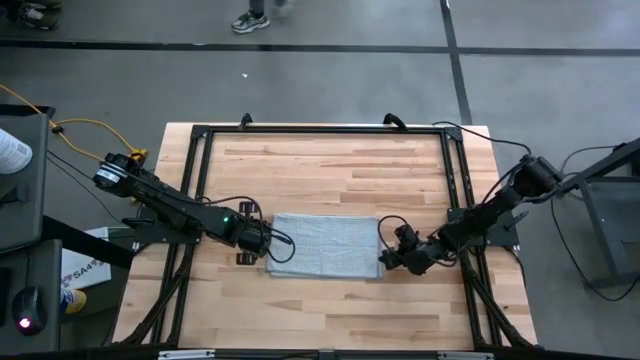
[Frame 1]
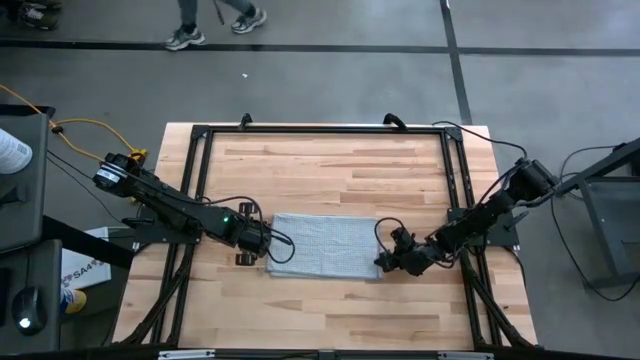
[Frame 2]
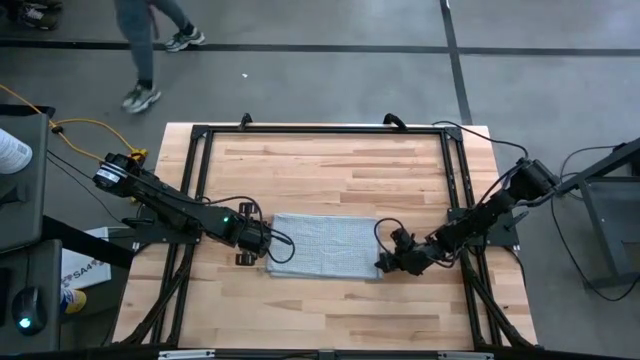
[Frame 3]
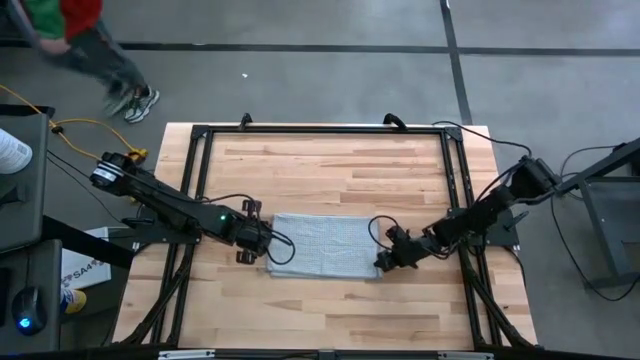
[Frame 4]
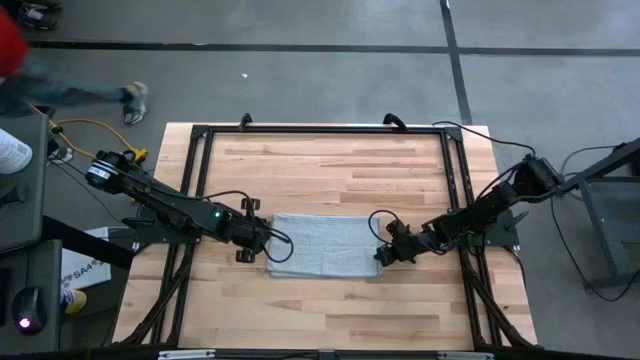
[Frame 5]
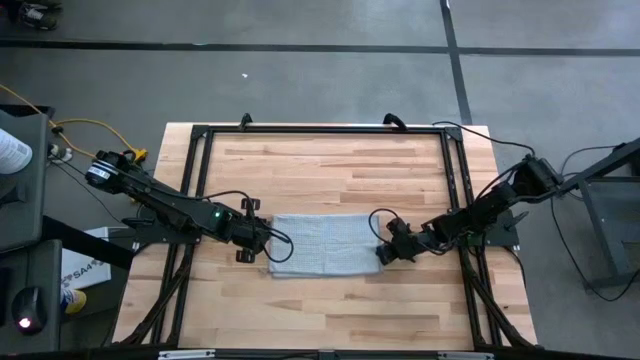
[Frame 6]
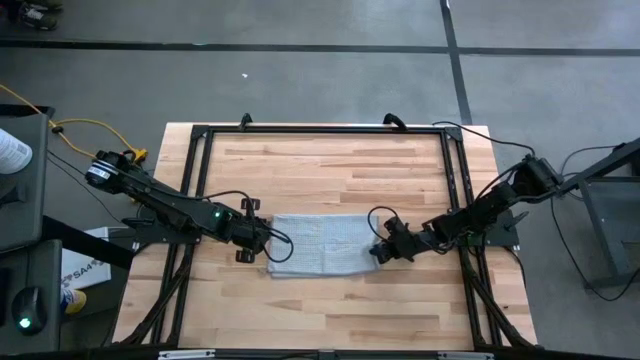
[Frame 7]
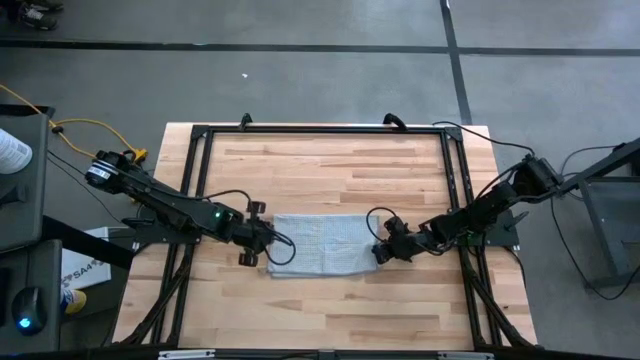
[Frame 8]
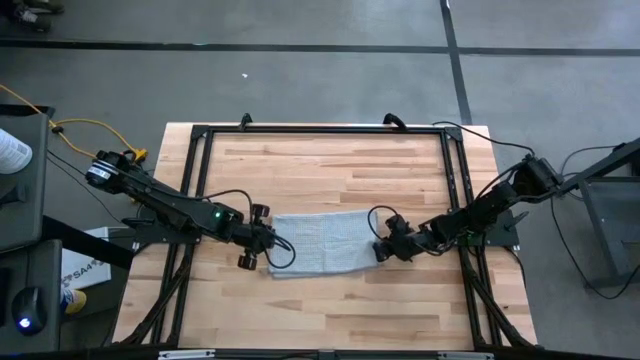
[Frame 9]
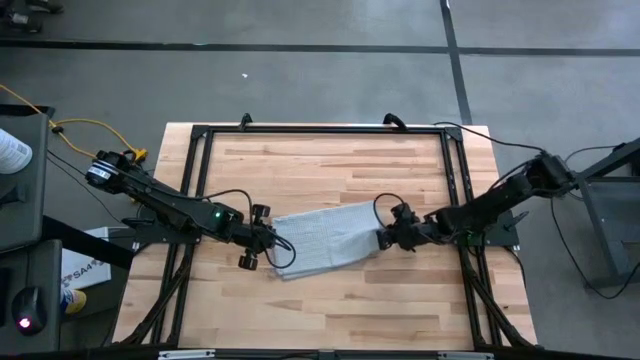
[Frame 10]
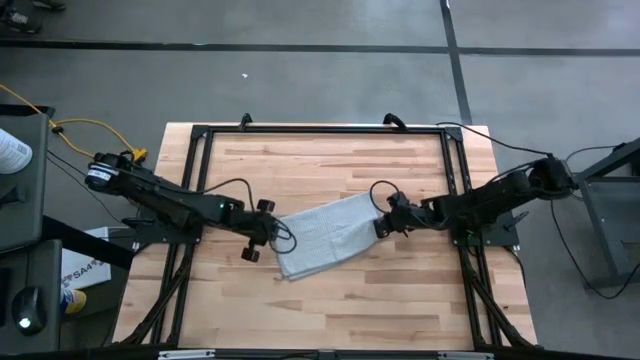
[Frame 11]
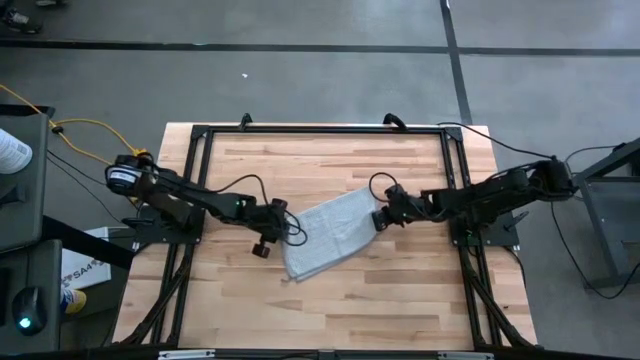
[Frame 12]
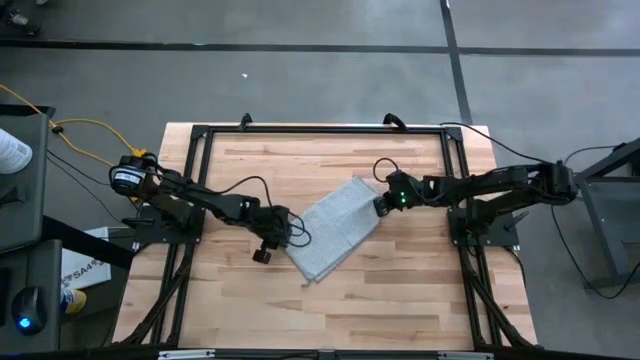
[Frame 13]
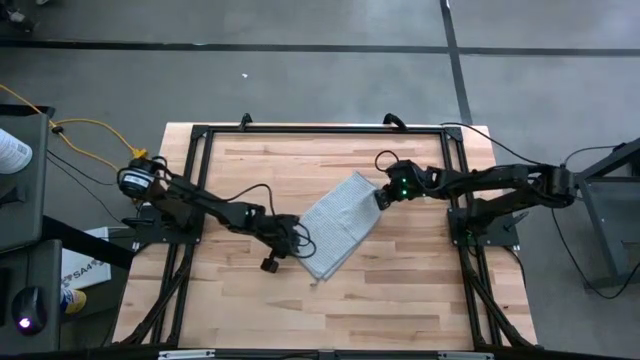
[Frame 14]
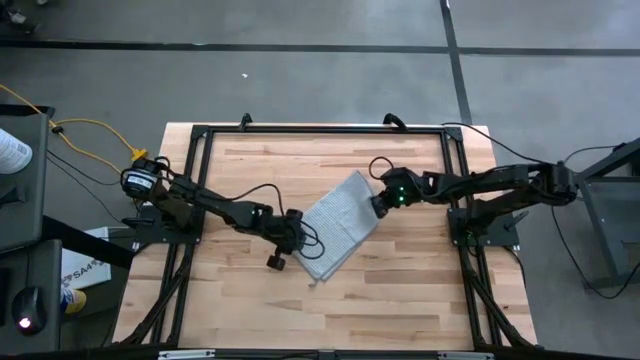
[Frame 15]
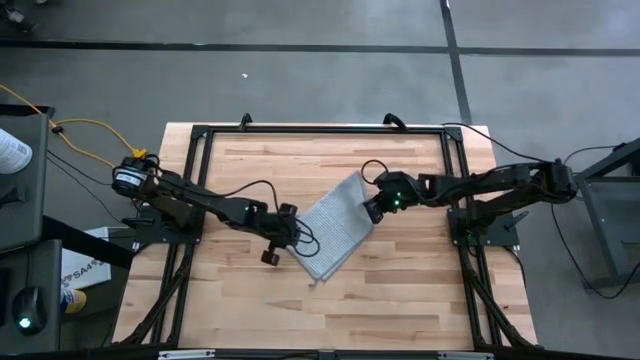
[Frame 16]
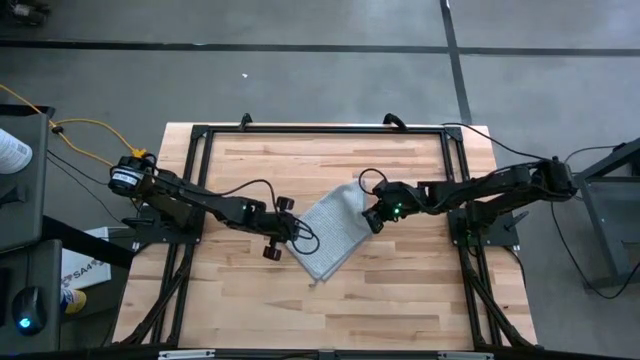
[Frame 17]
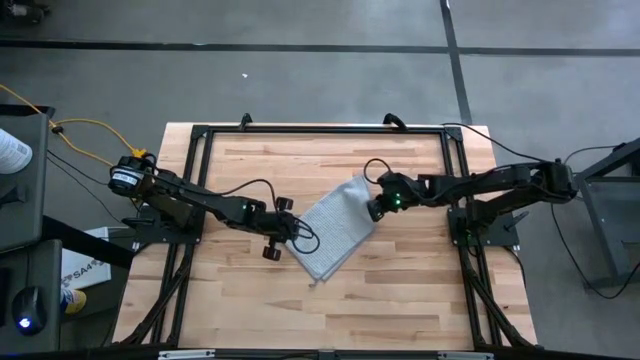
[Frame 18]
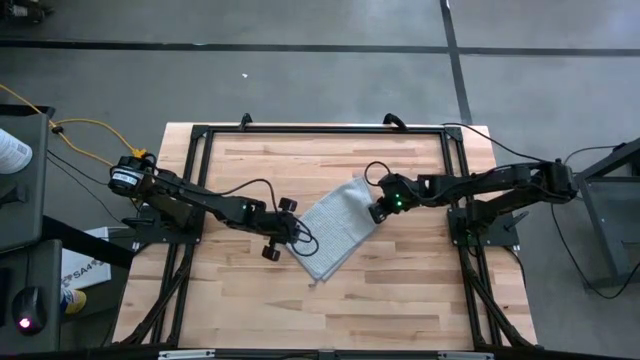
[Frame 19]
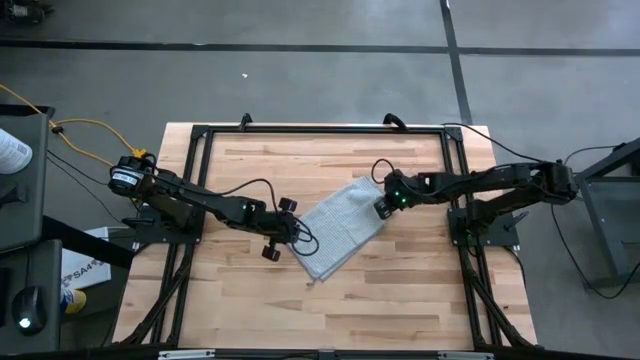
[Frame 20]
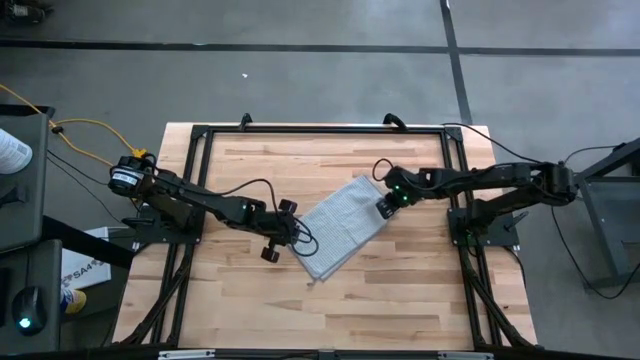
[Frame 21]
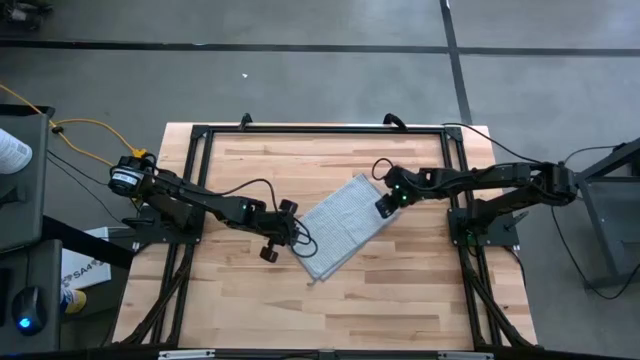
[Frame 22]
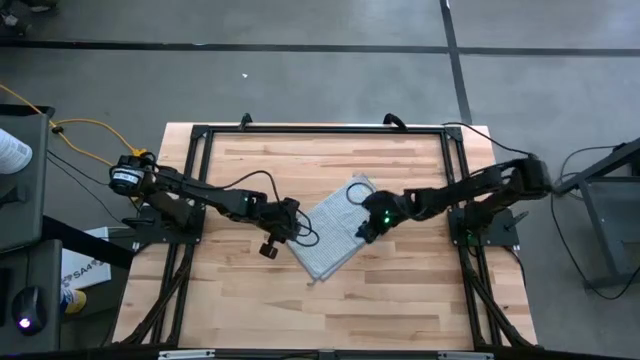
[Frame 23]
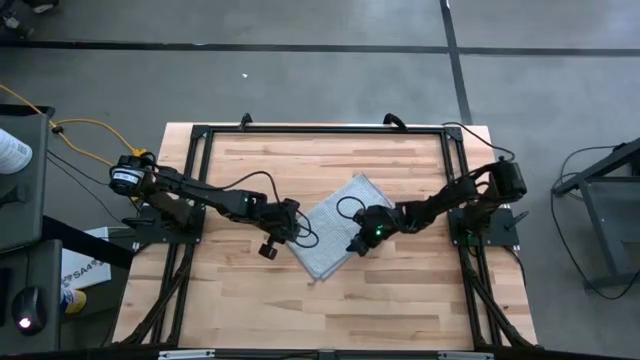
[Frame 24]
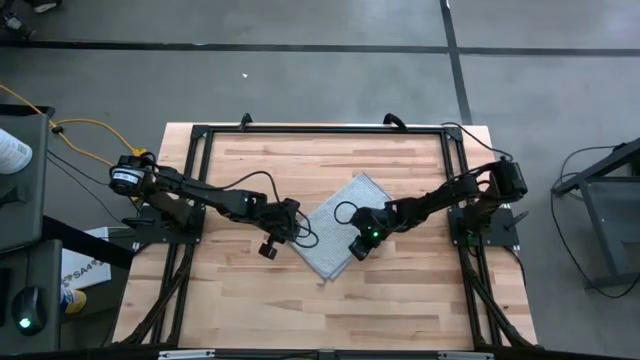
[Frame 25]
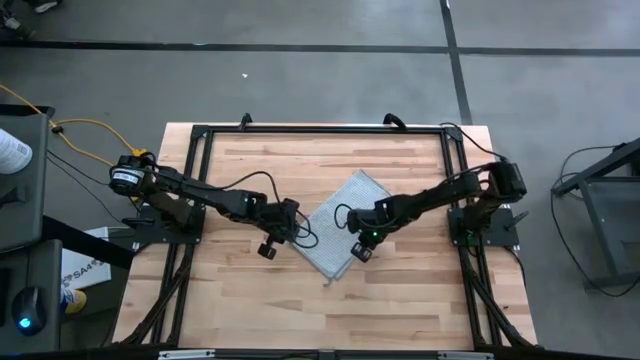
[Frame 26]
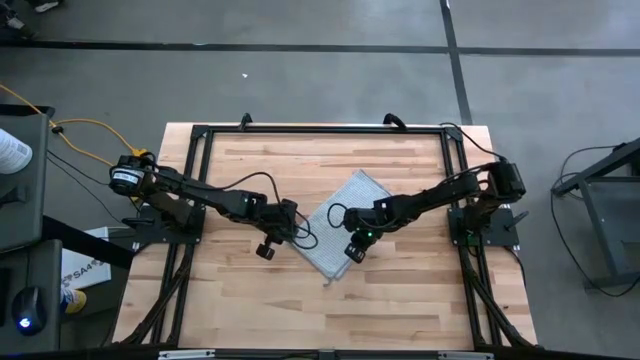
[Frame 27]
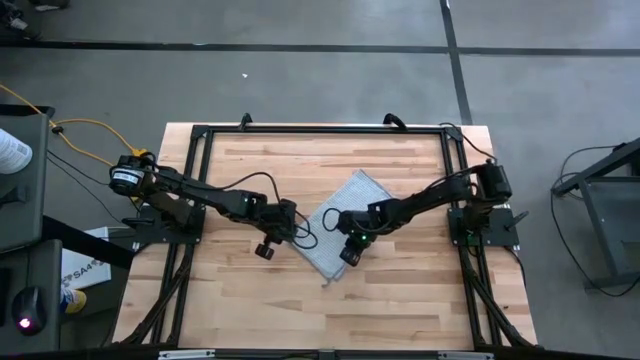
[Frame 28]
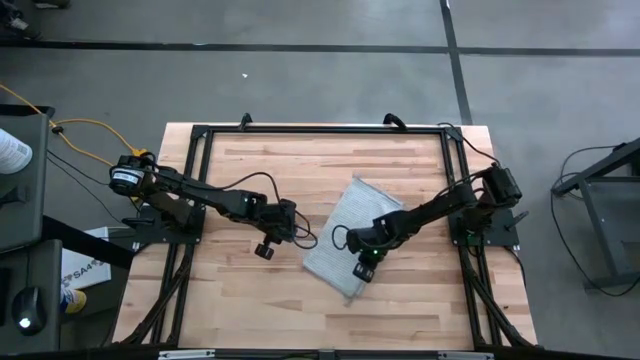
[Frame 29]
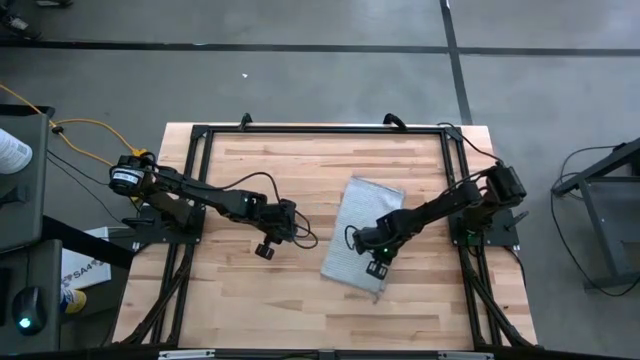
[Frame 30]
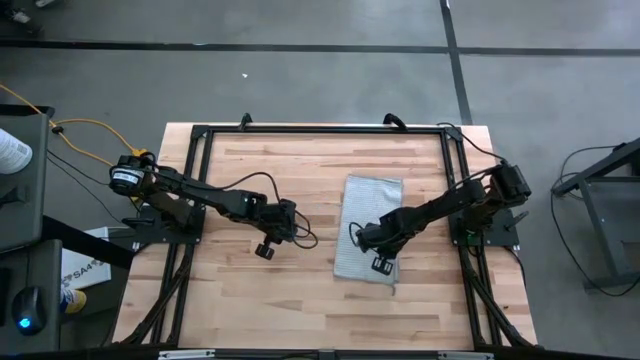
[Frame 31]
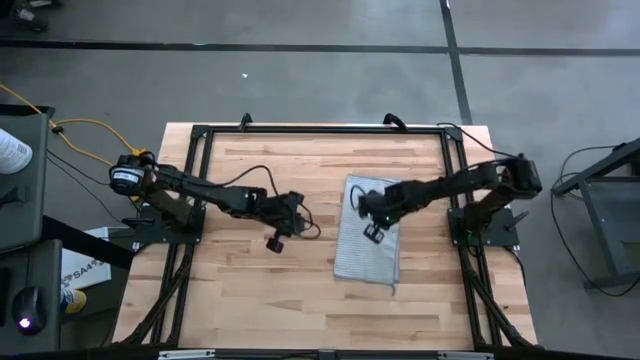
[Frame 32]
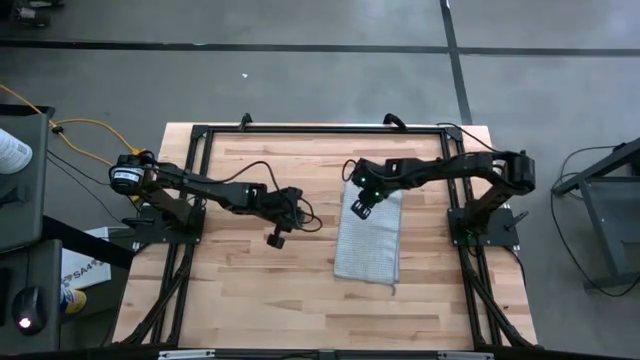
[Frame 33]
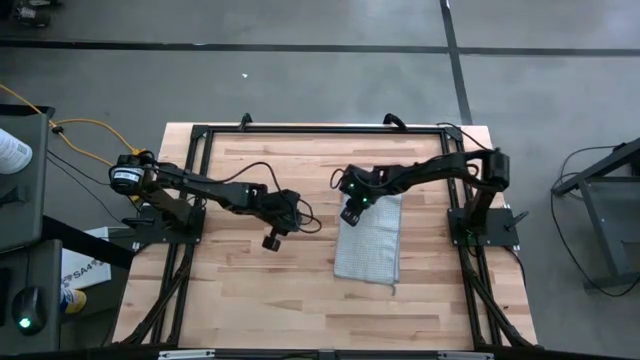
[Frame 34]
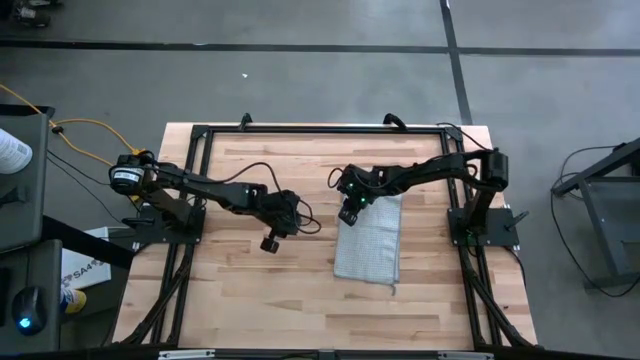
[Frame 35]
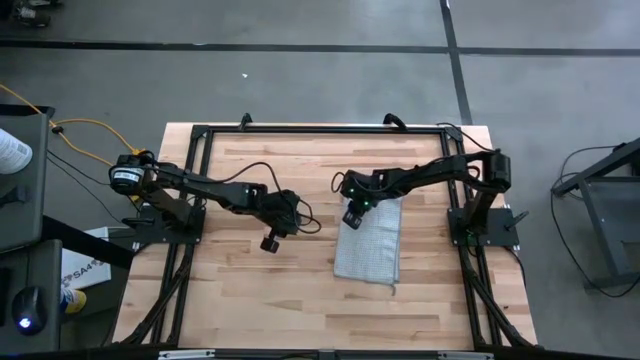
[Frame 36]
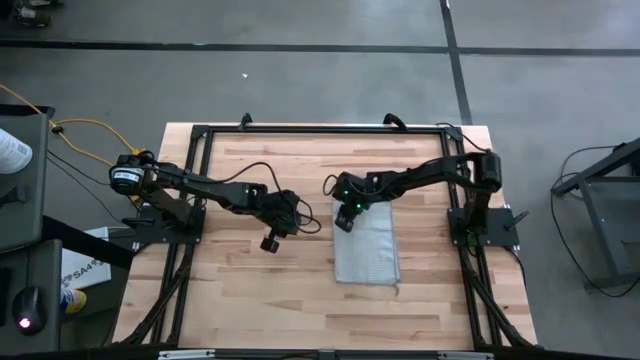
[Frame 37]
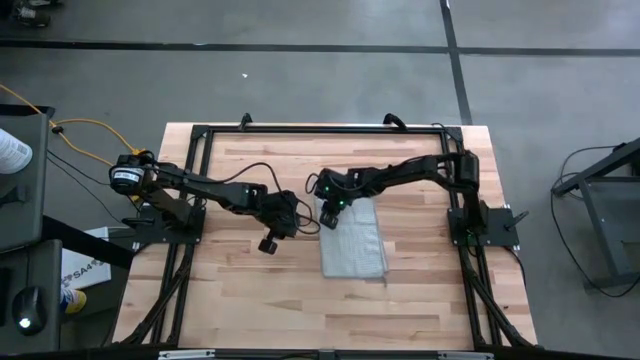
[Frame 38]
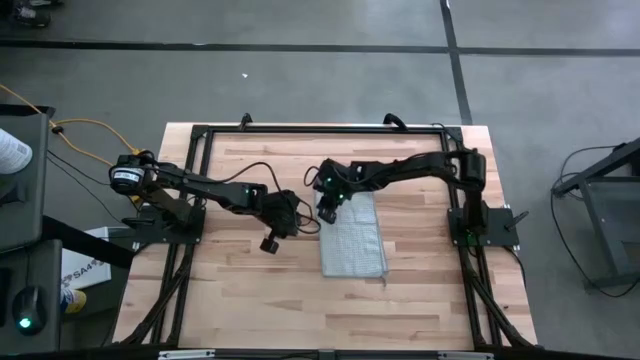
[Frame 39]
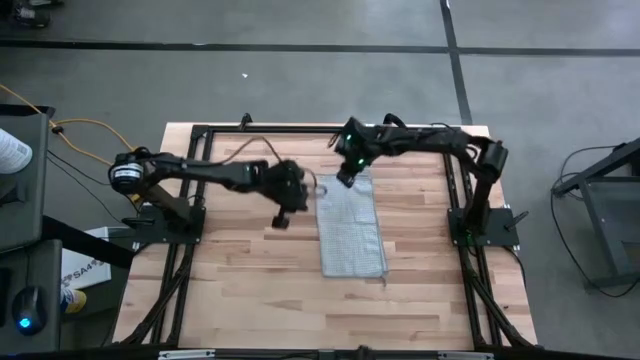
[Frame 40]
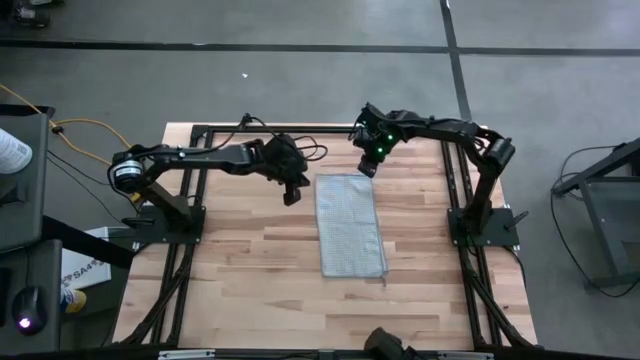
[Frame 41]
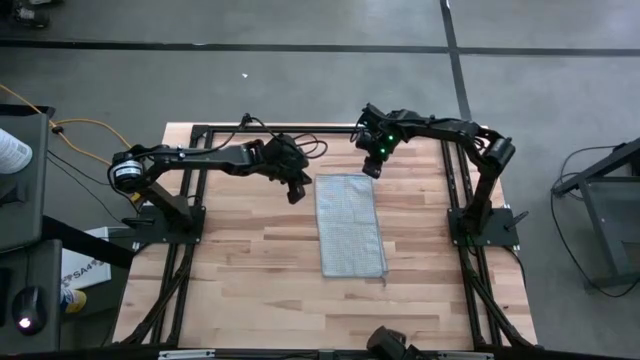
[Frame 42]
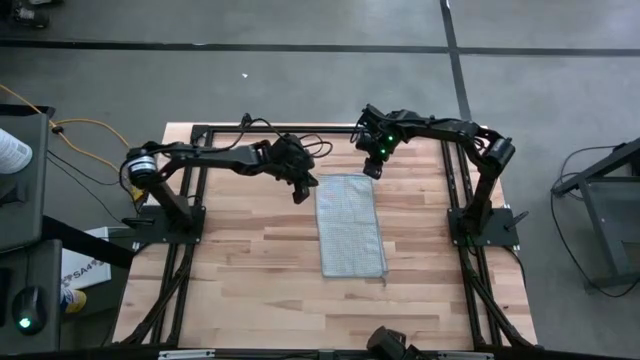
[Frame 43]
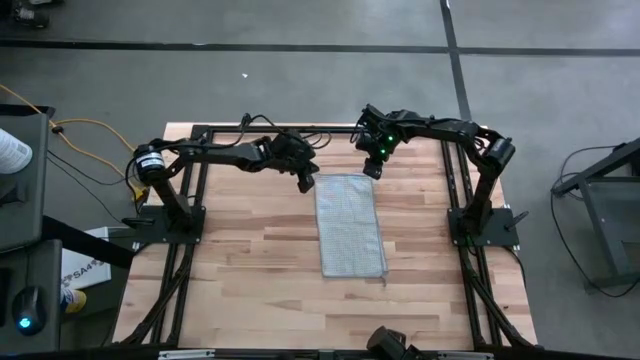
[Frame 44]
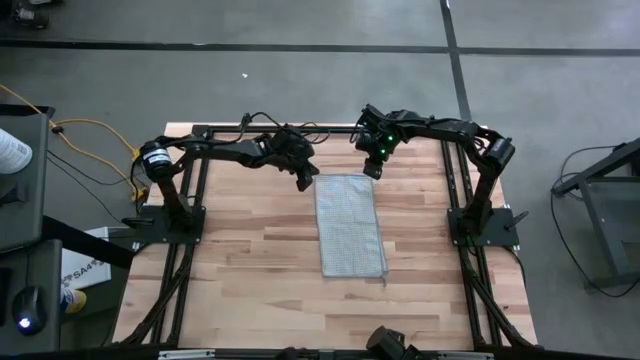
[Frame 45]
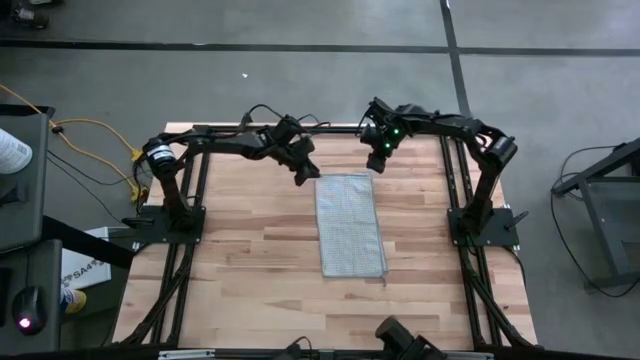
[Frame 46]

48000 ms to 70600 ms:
Task: Fold microfiber towels
Fold the gray towel on the table
